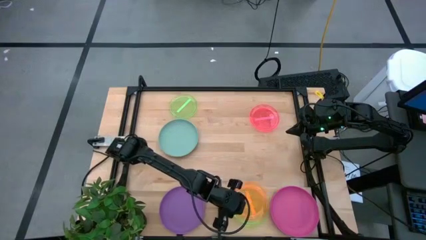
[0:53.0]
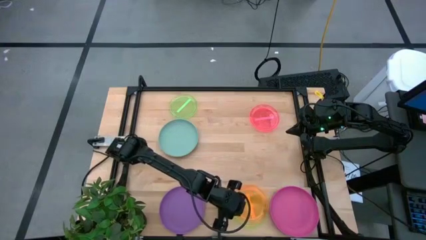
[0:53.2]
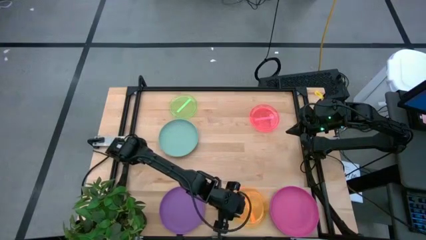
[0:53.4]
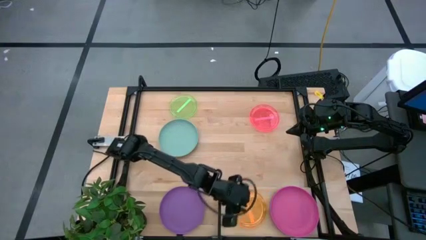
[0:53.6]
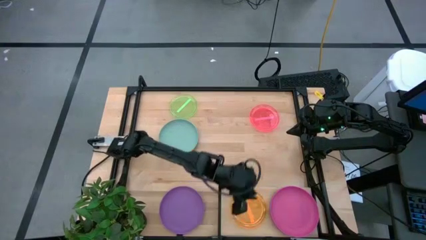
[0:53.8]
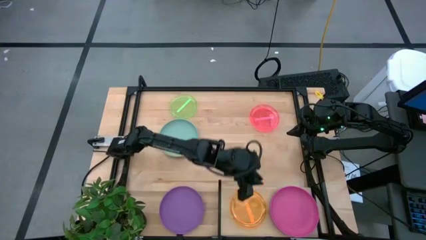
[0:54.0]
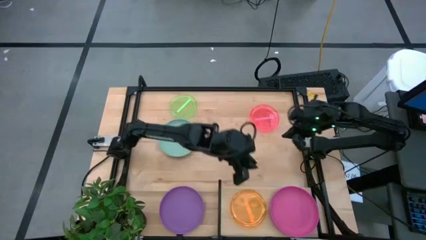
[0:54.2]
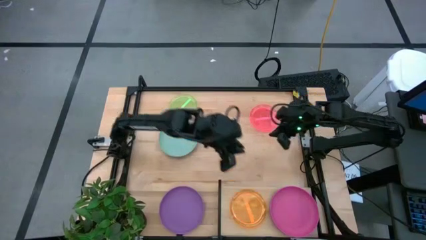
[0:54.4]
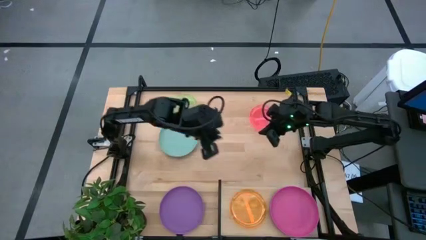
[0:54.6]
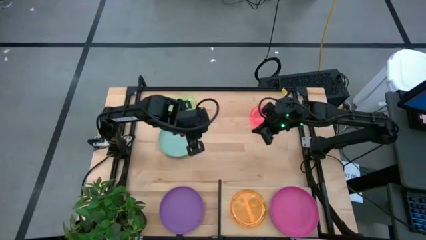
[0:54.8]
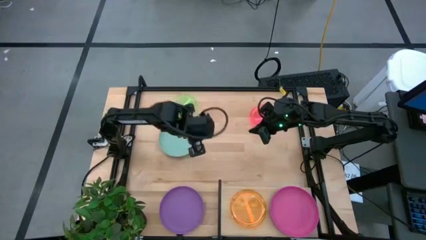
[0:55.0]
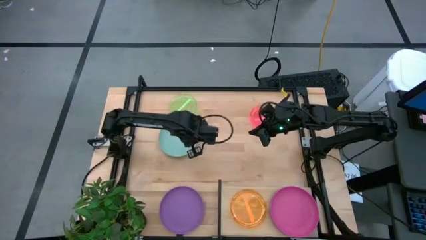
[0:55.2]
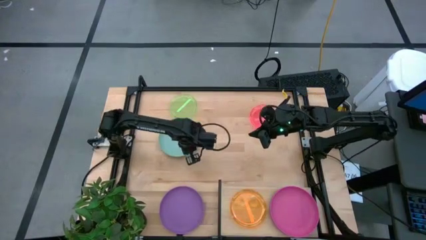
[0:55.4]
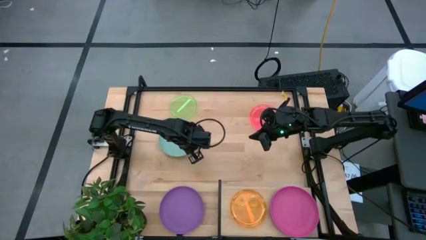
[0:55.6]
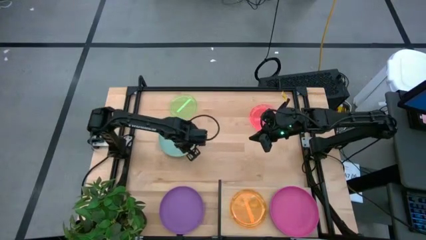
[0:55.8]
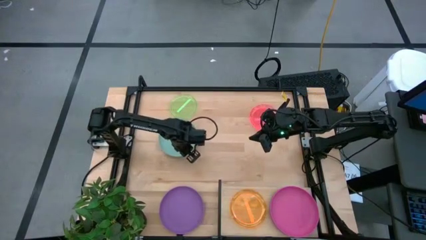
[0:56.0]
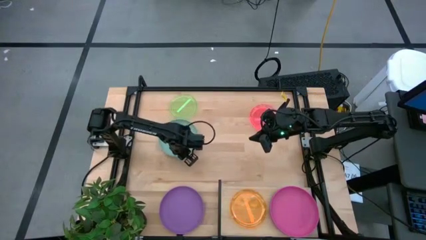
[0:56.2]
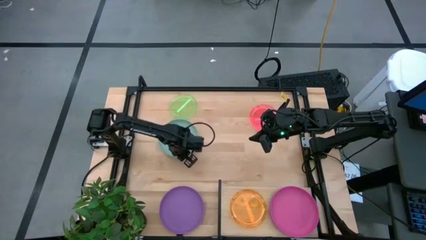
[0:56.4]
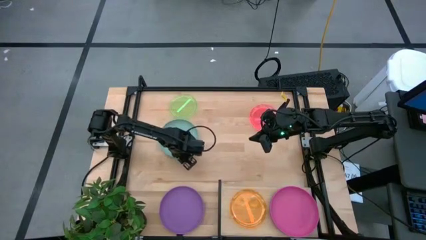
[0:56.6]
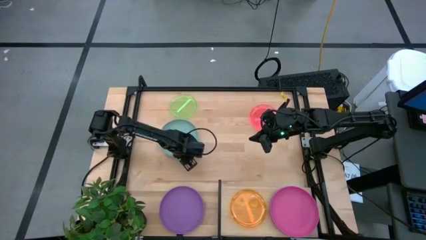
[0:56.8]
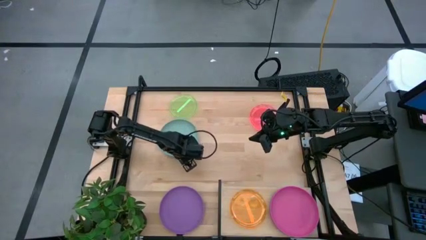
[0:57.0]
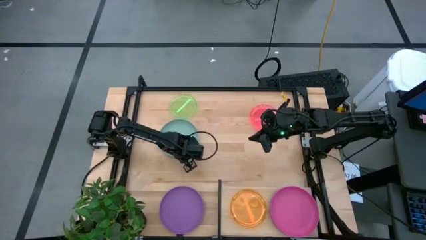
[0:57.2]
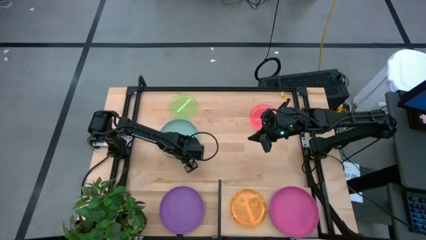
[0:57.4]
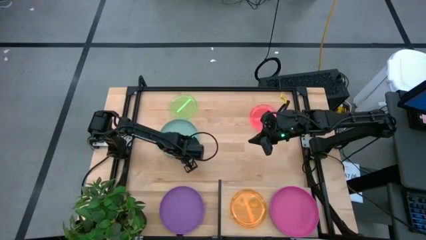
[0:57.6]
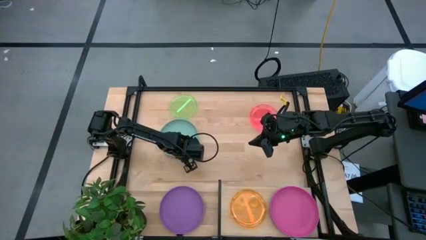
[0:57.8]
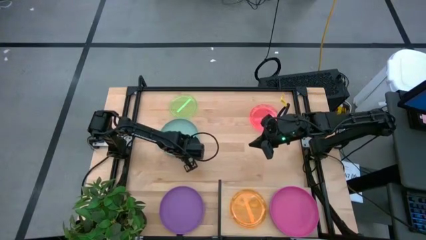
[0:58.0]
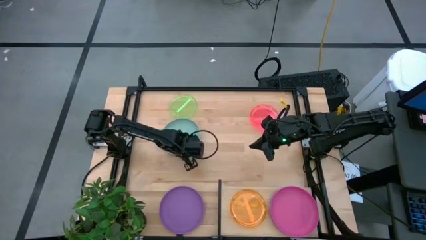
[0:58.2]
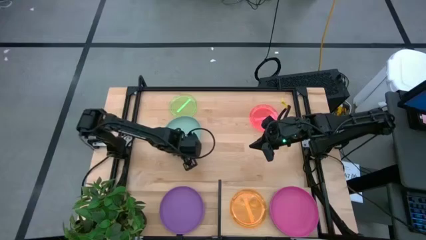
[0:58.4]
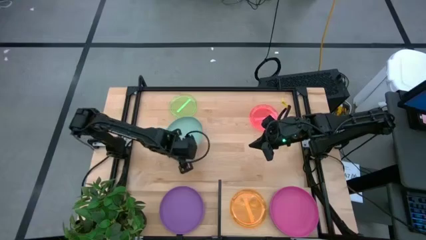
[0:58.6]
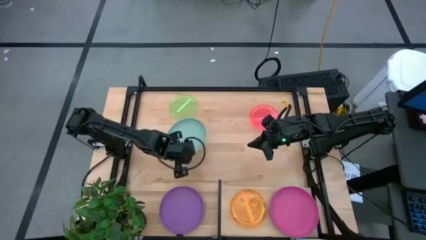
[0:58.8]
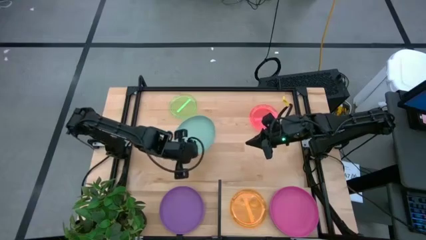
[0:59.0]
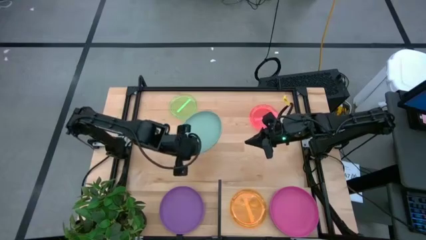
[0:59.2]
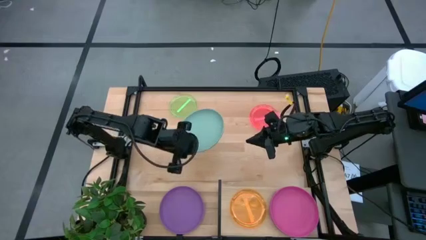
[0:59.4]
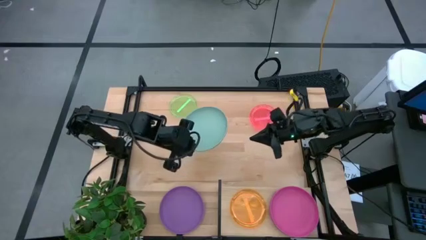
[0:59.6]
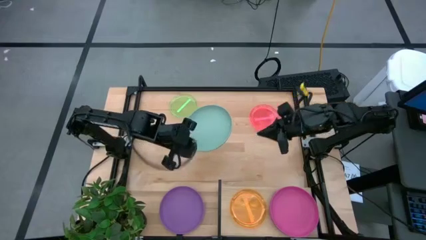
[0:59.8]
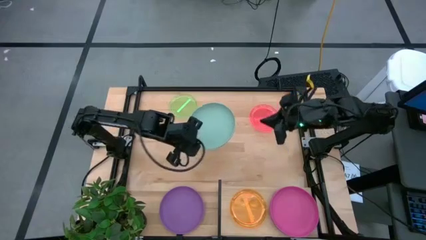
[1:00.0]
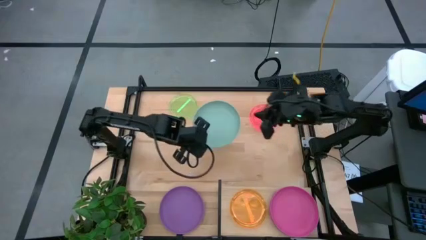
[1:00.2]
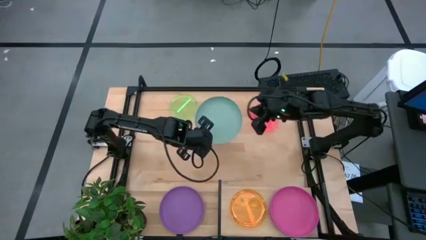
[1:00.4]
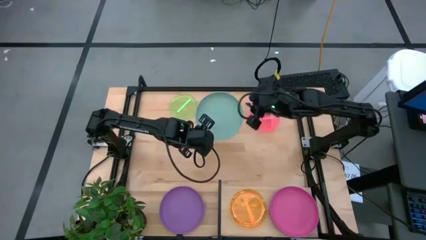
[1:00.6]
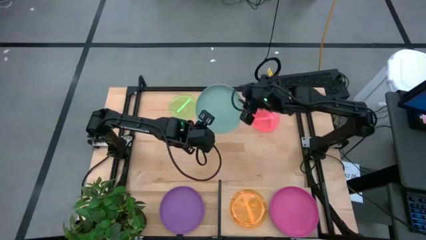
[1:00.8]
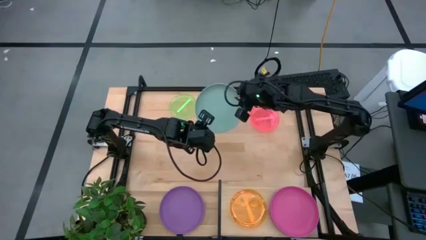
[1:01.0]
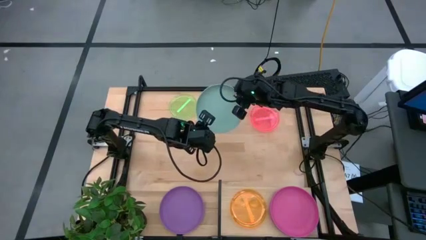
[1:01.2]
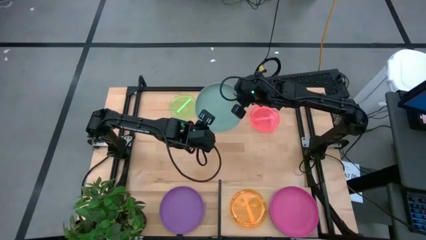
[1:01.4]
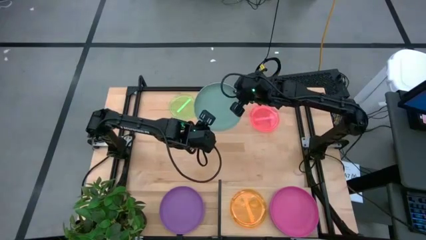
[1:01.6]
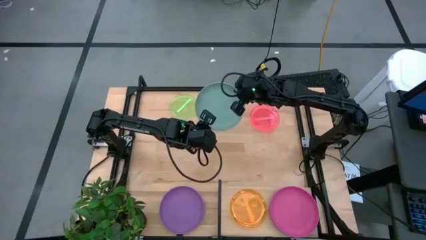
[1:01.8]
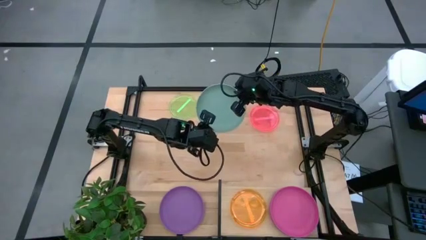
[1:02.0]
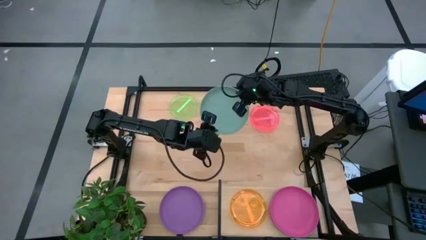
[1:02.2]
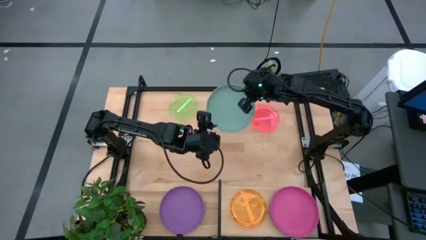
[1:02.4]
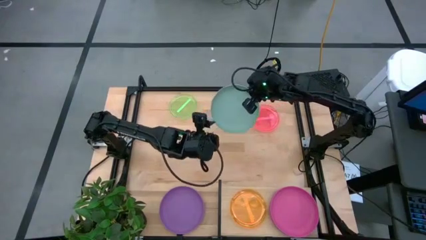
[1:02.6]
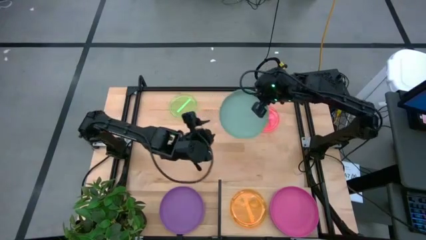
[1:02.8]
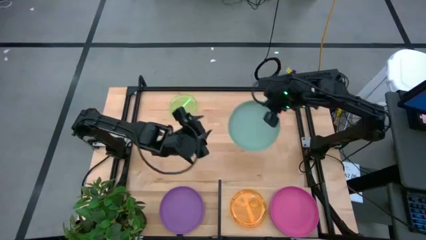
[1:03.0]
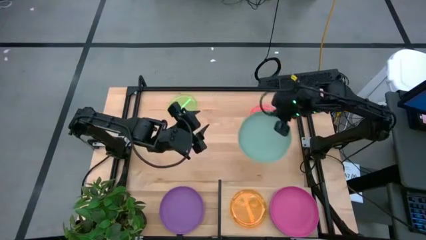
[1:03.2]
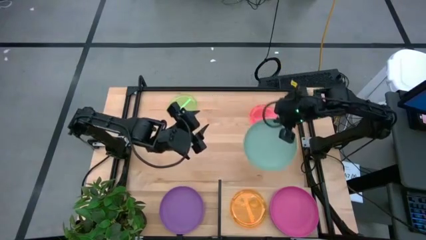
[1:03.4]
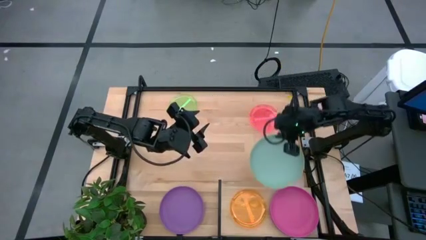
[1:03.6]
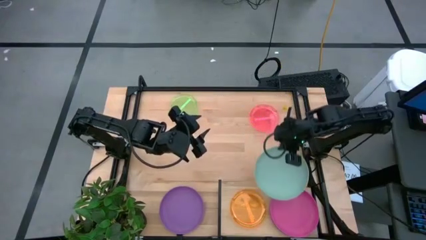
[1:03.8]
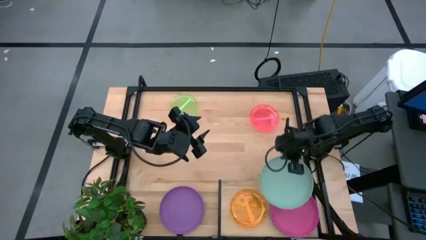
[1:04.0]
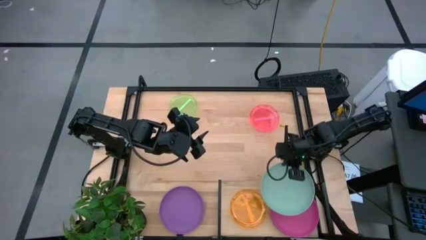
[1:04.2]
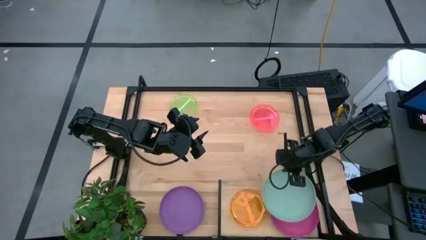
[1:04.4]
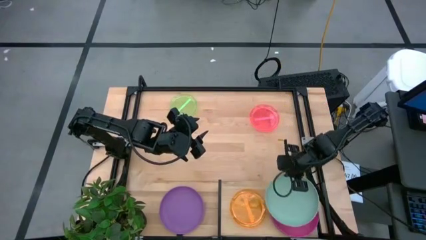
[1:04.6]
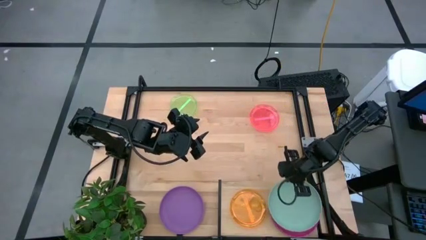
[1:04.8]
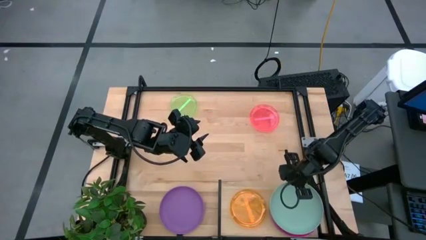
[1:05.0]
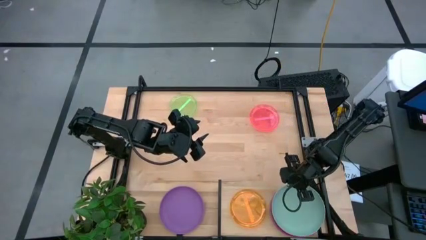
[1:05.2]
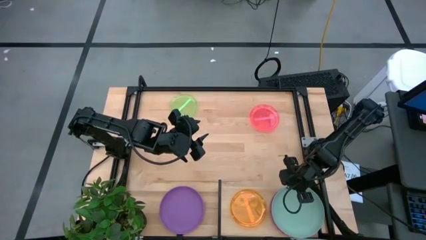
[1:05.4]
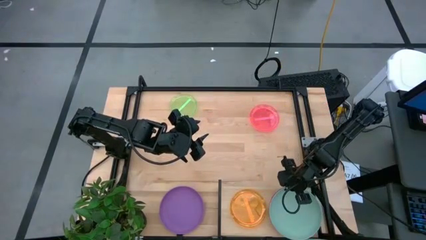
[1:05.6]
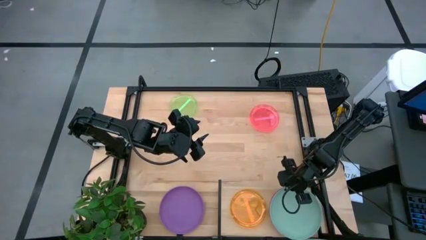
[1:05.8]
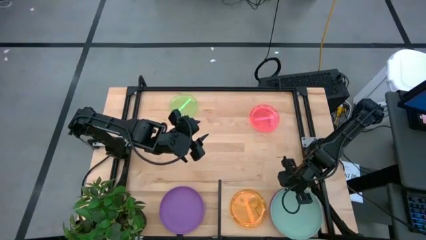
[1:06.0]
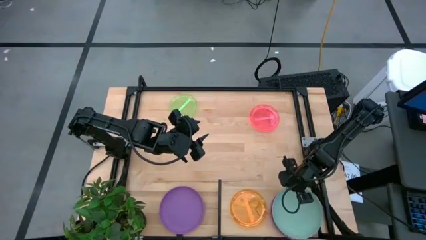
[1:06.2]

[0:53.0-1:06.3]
Task: Place and stack plates onto a shelf
Stack the blue plate on top of the pink plate on the shelf

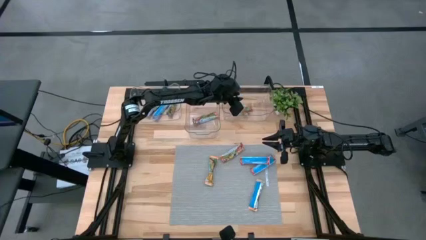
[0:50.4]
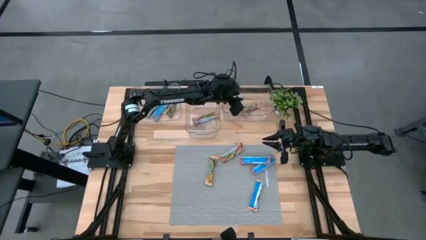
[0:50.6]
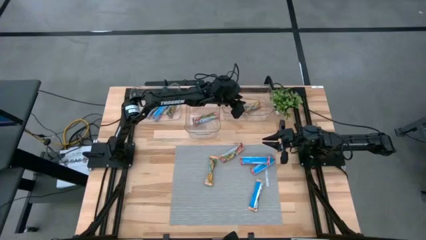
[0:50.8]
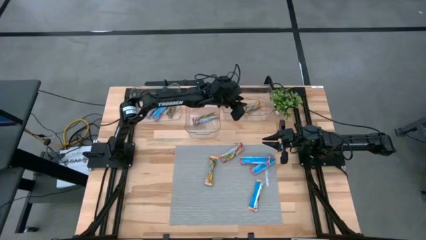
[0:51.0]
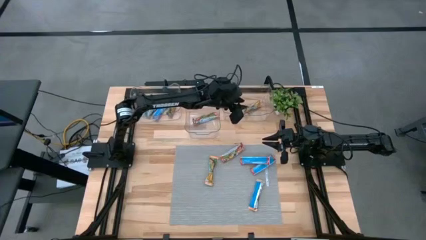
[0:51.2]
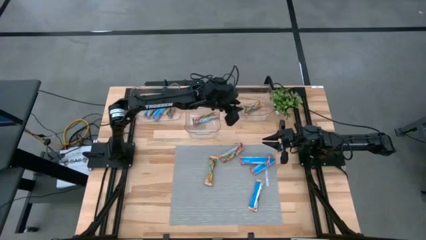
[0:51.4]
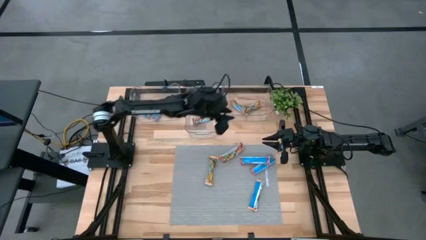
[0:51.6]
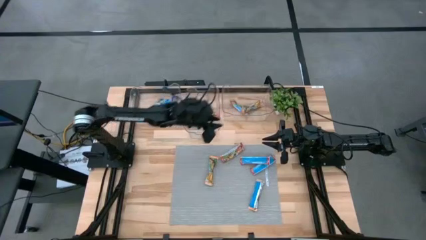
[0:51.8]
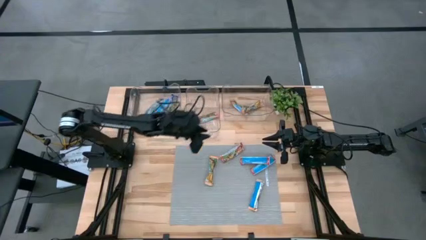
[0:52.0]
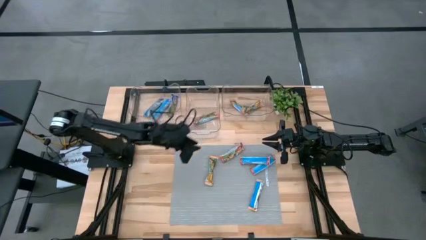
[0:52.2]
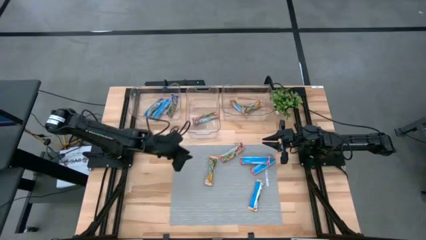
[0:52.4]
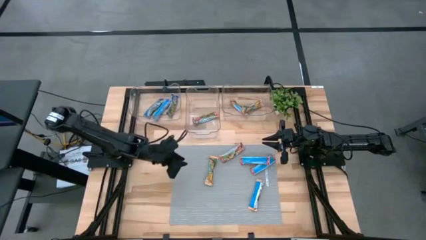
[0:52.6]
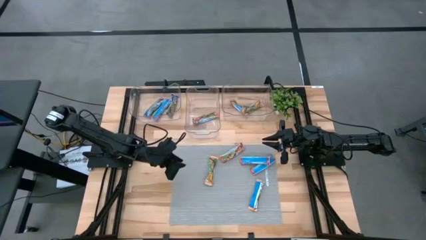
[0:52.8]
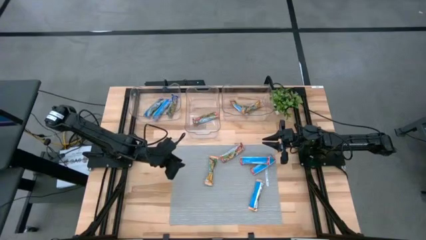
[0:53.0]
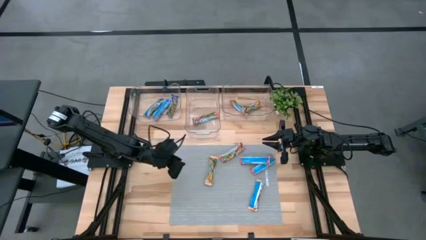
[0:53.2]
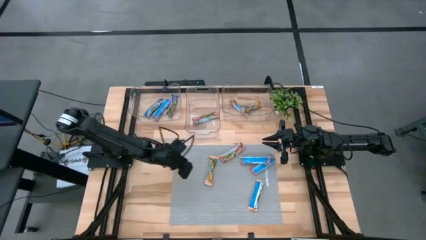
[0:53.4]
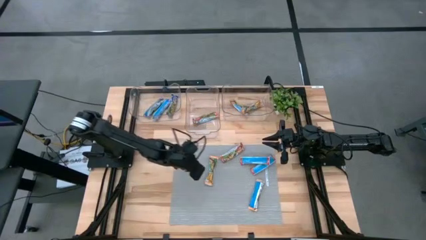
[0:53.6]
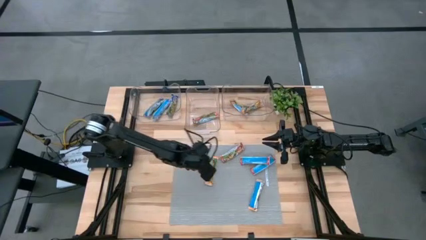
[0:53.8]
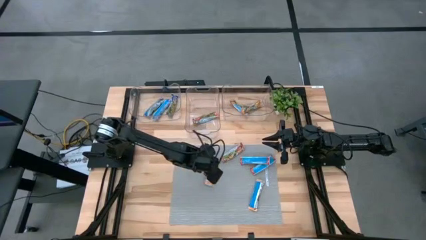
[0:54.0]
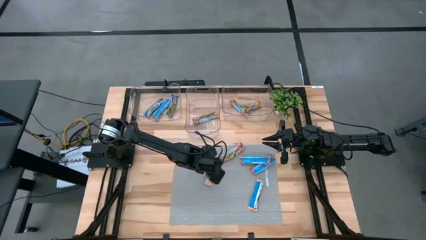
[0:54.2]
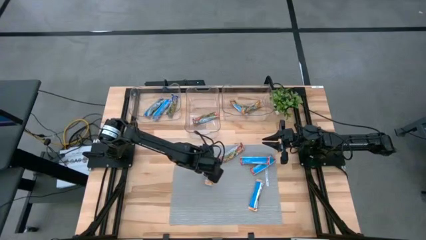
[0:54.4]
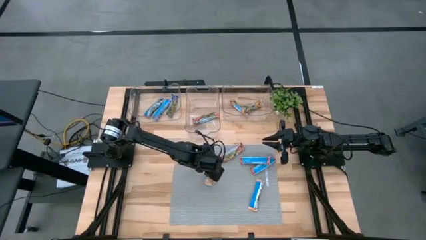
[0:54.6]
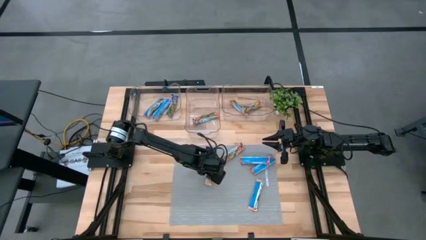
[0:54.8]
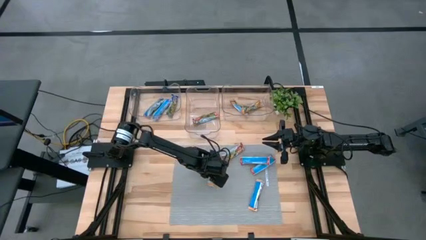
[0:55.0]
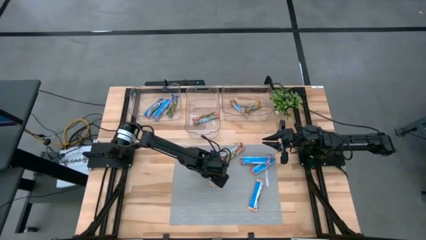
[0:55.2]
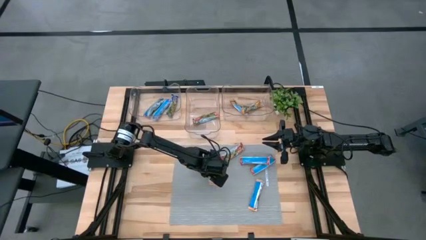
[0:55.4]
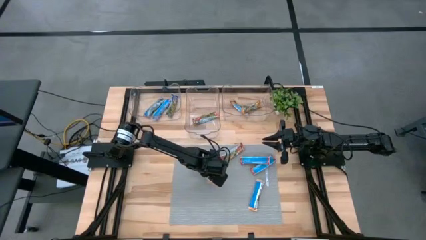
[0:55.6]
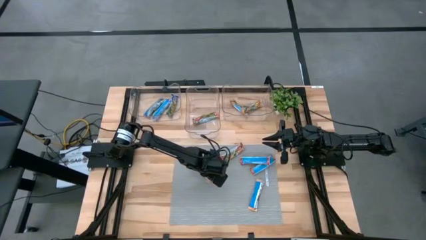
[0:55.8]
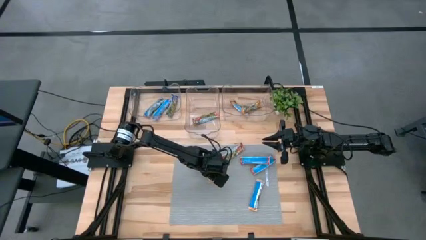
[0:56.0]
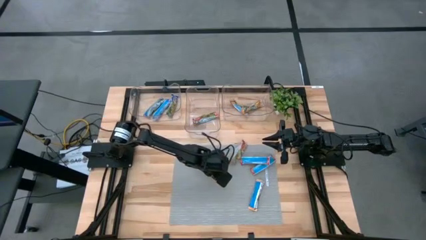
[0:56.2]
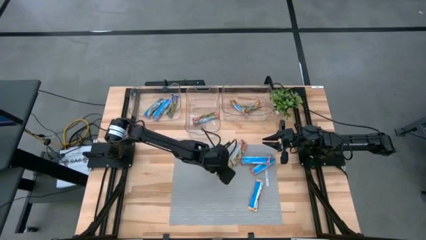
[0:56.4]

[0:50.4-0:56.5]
Task: Pick and place Granola Bars by type
Put the yellow granola bar into the right transparent bin
